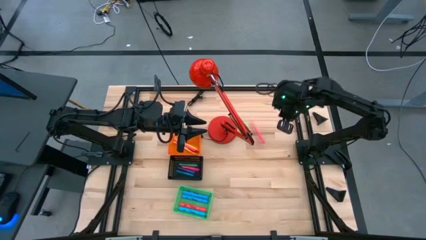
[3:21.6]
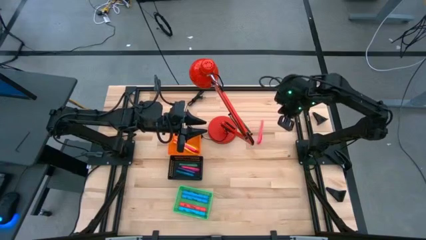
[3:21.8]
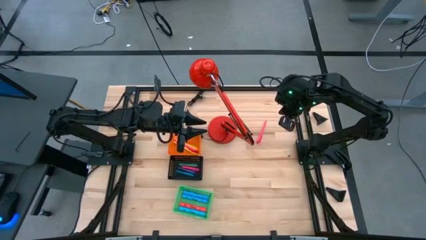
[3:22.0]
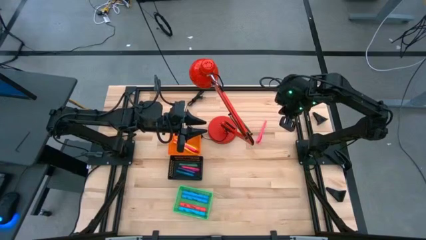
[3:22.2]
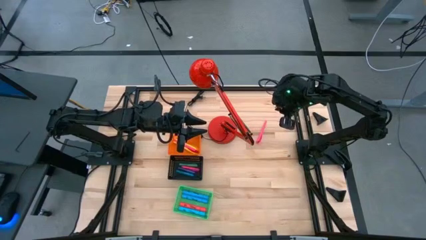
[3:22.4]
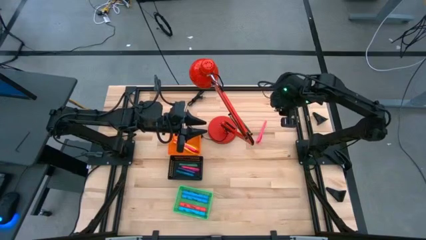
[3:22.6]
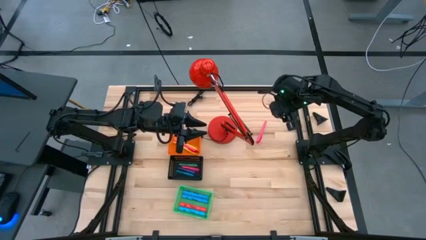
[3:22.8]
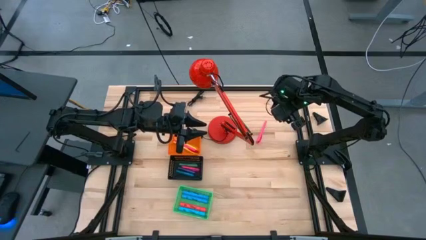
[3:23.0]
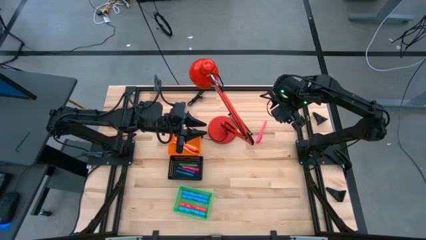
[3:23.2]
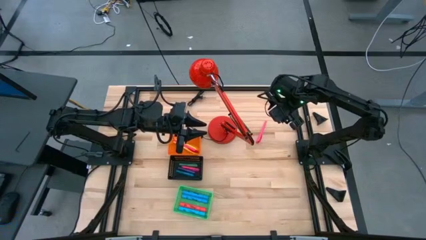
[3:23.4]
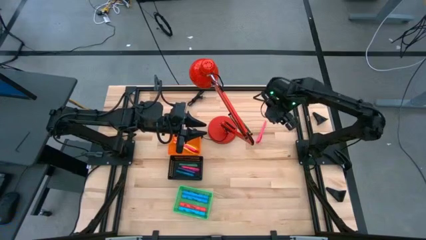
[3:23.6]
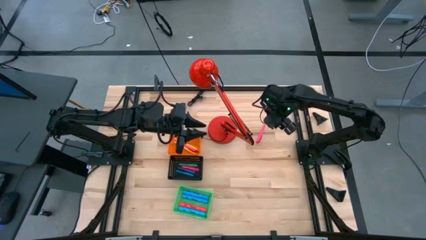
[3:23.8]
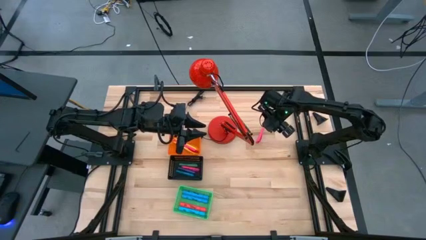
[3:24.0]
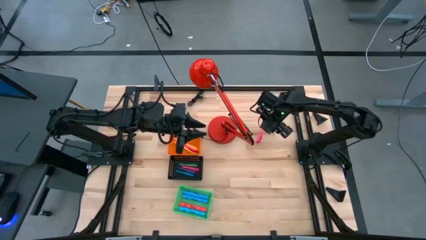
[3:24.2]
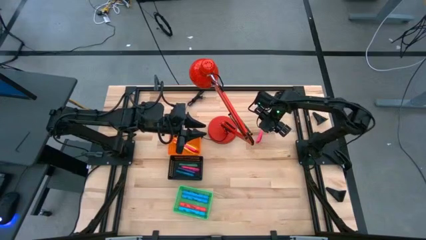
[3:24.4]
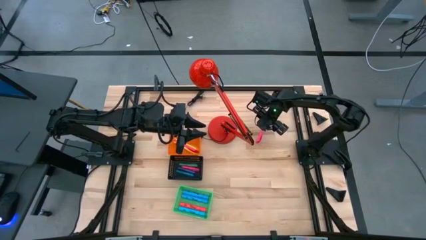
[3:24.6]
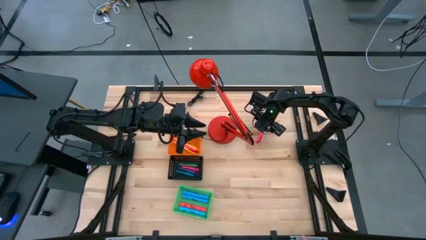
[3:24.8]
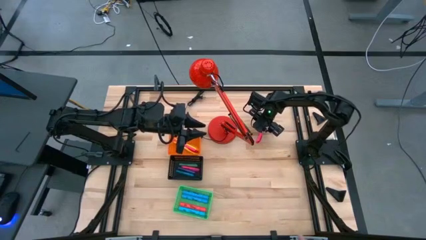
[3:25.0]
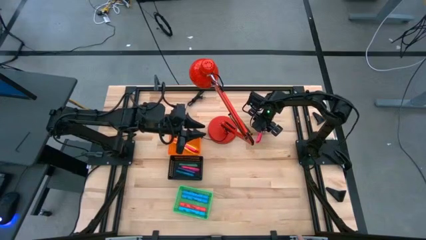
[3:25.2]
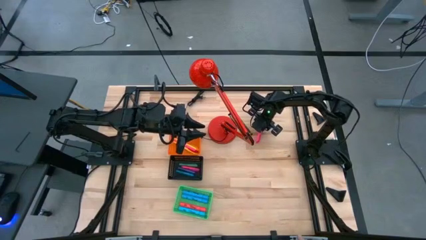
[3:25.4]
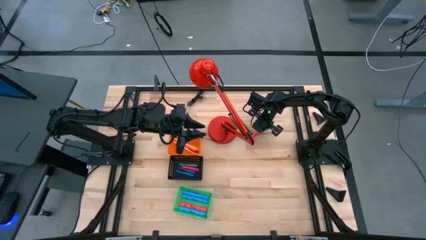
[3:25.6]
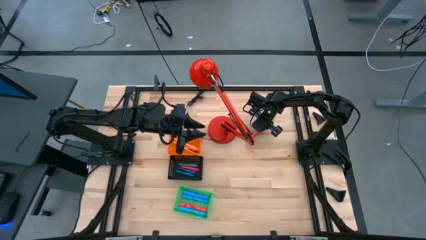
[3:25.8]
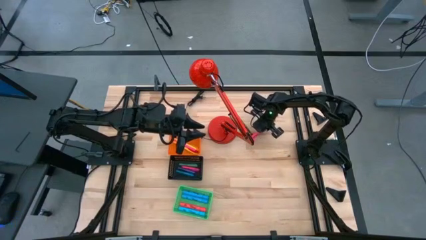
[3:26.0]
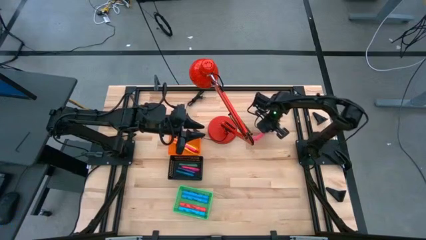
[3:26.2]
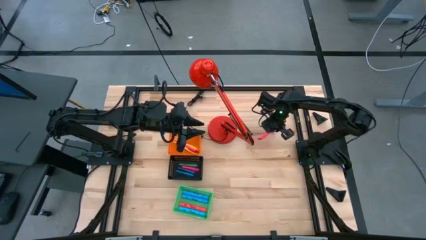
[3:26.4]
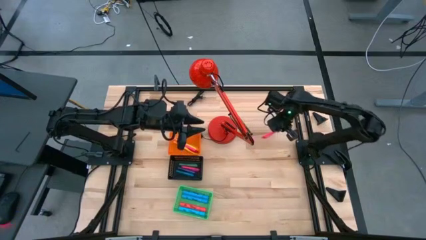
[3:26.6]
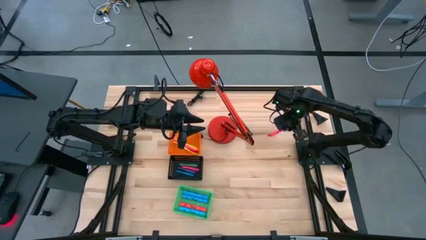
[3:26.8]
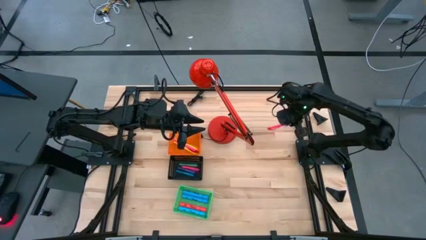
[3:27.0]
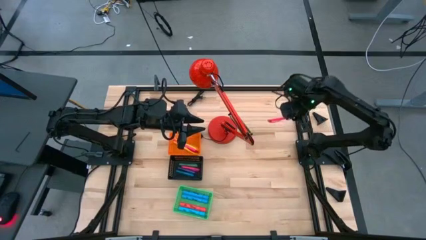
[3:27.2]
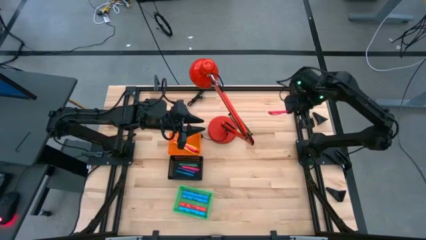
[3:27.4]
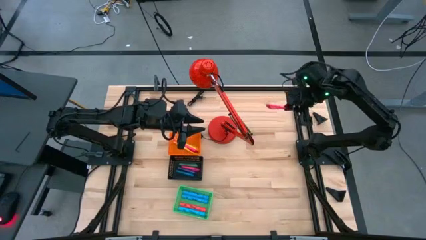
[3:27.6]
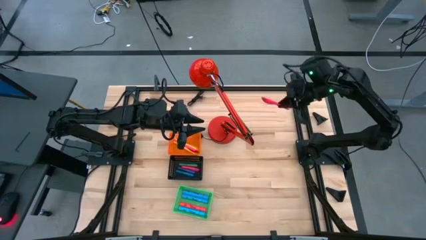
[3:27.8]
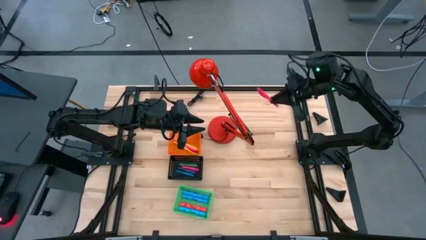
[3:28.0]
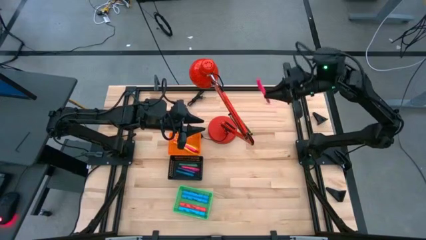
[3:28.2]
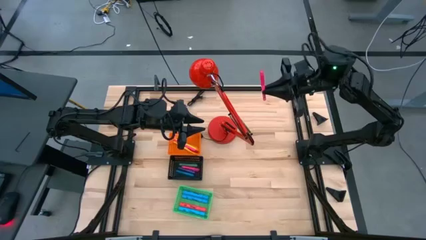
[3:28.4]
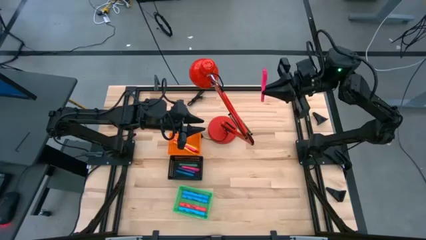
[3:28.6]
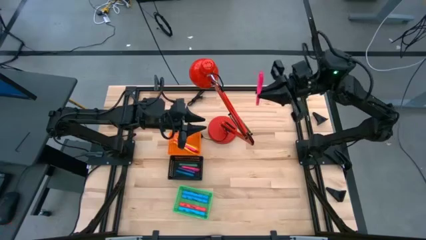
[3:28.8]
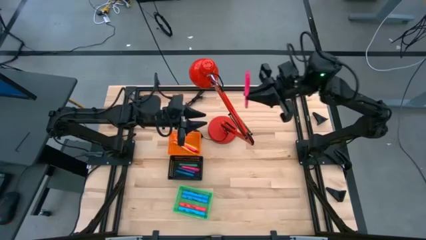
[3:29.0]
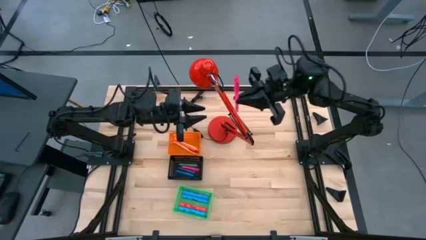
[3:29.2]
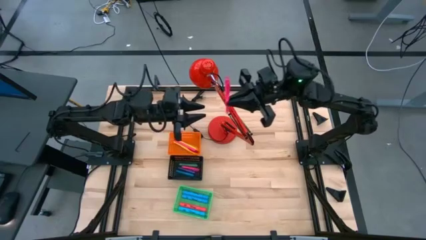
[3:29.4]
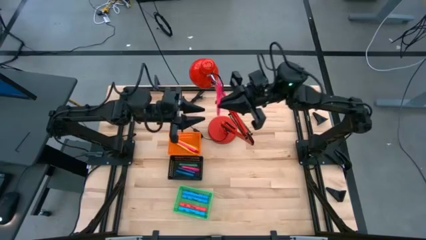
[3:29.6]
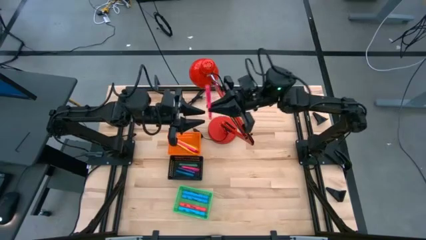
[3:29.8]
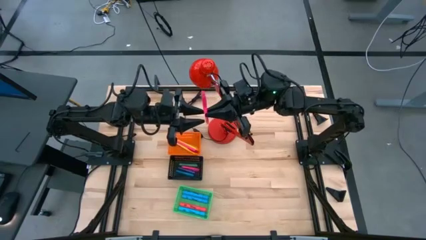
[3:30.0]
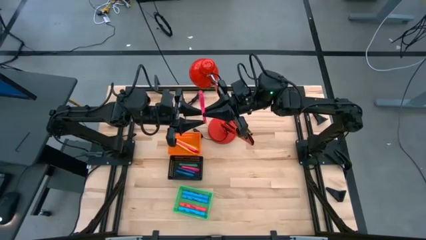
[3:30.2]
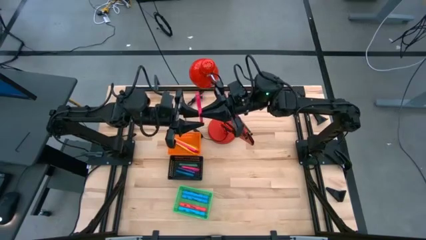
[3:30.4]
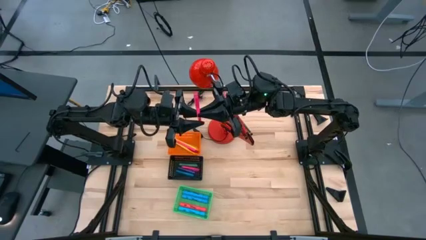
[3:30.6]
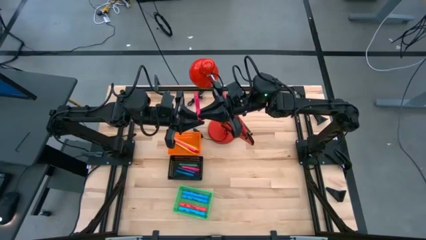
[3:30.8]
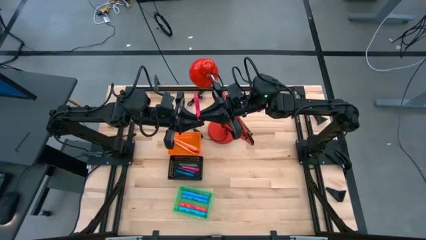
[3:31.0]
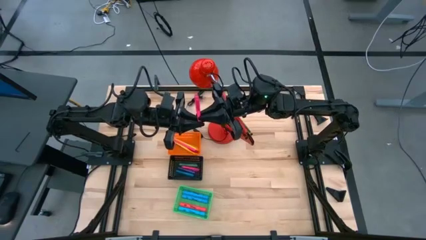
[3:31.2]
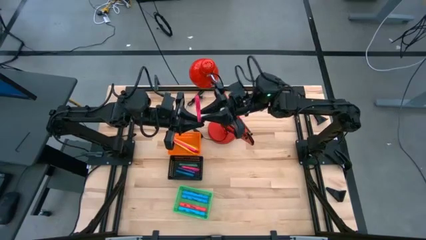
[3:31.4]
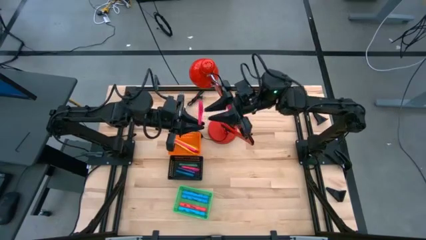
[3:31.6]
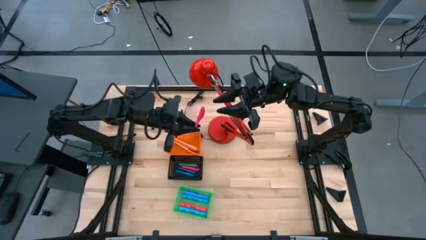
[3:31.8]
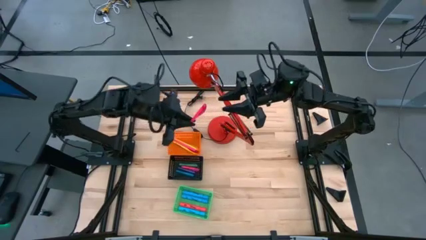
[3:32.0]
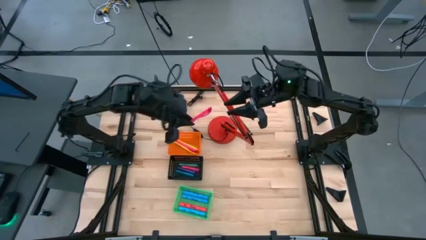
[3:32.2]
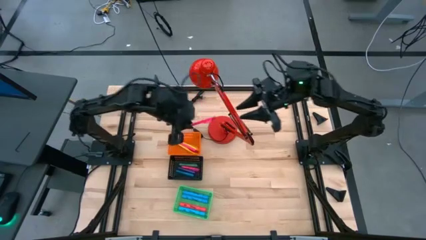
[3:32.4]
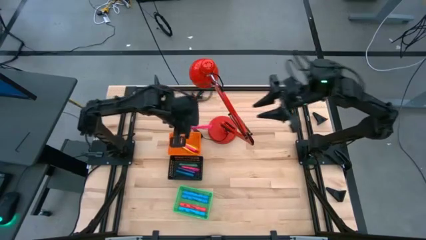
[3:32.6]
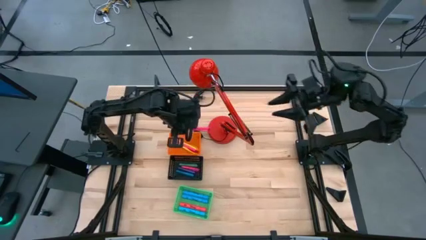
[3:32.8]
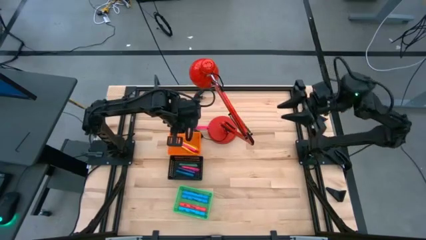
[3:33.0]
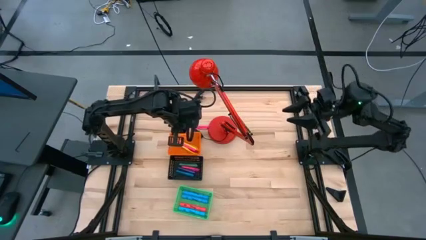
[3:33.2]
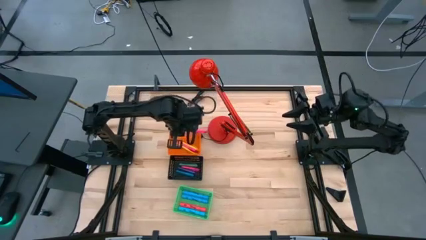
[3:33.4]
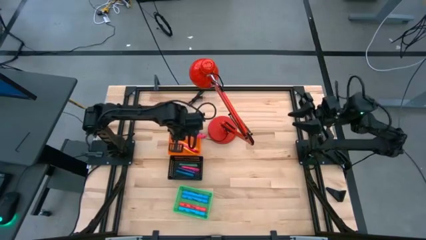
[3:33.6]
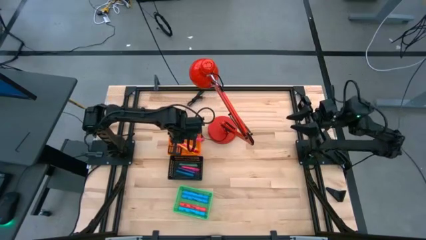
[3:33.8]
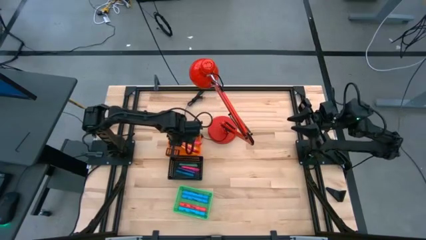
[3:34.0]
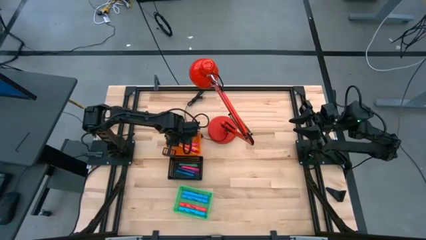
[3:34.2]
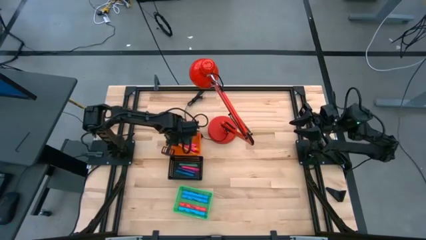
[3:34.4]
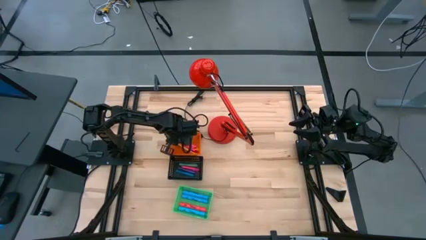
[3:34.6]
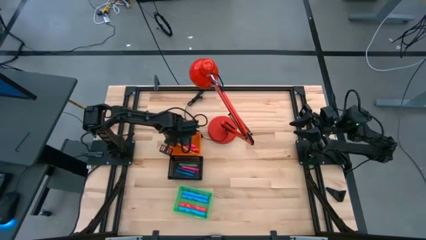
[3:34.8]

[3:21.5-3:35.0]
Task: Pick & Place Markers
Put the pink pen into the orange bin
